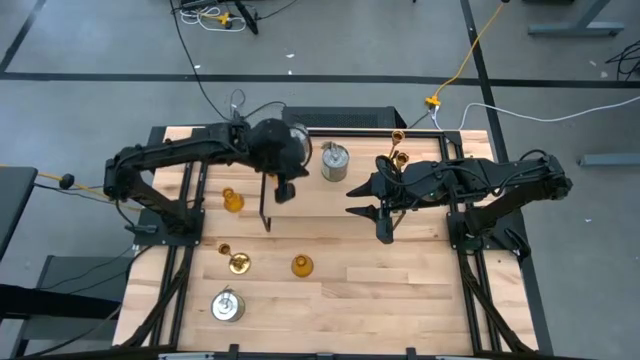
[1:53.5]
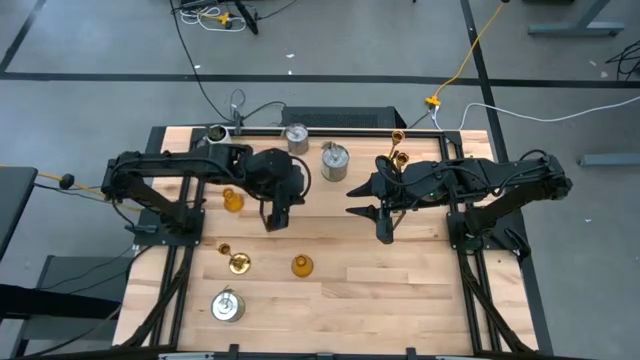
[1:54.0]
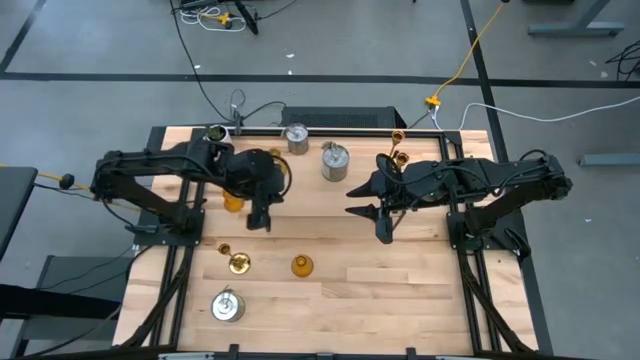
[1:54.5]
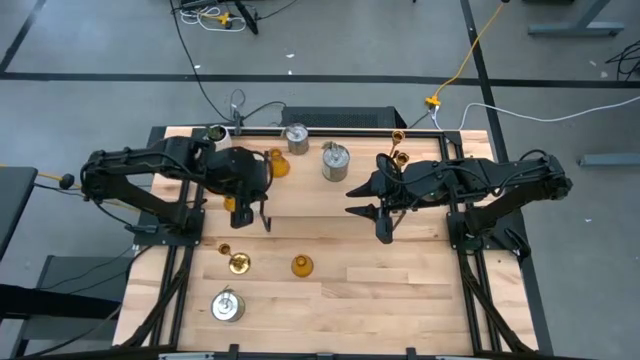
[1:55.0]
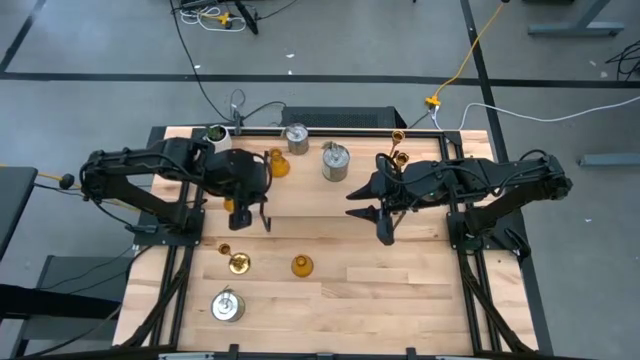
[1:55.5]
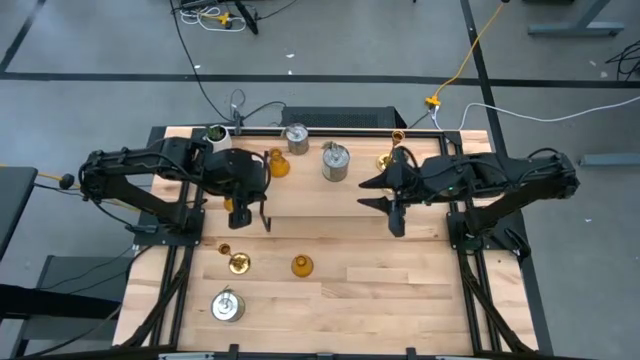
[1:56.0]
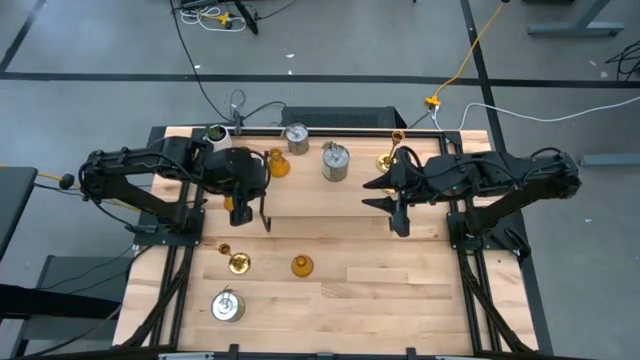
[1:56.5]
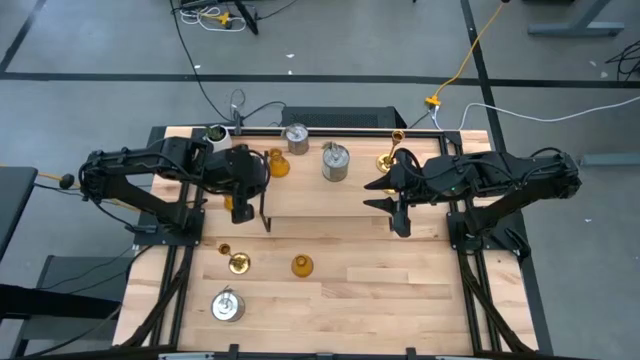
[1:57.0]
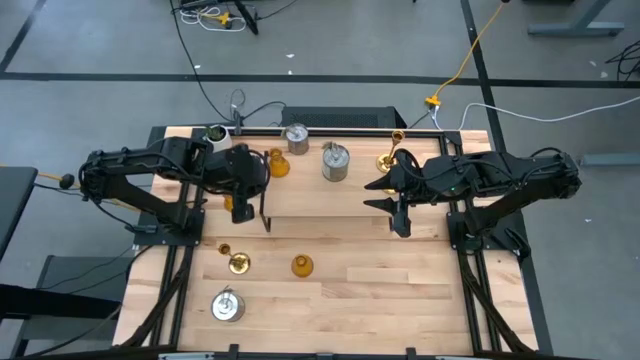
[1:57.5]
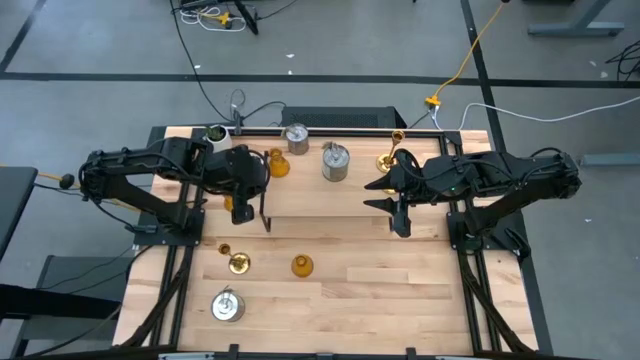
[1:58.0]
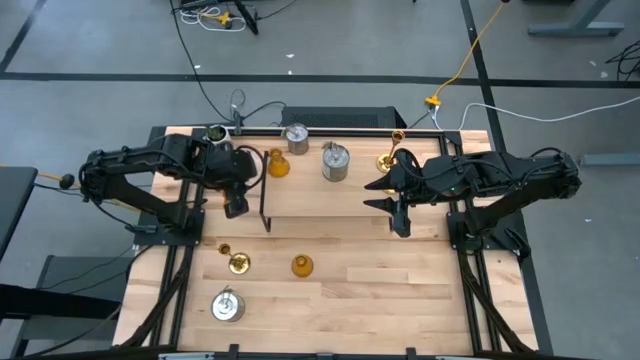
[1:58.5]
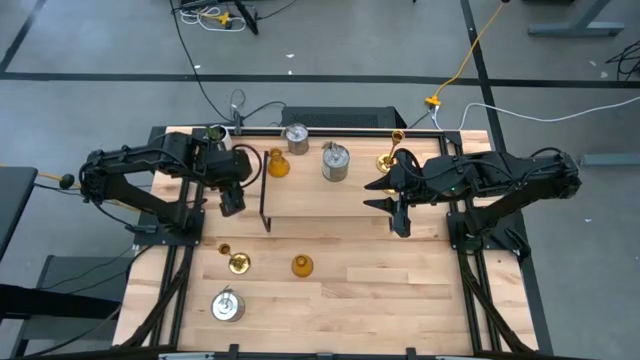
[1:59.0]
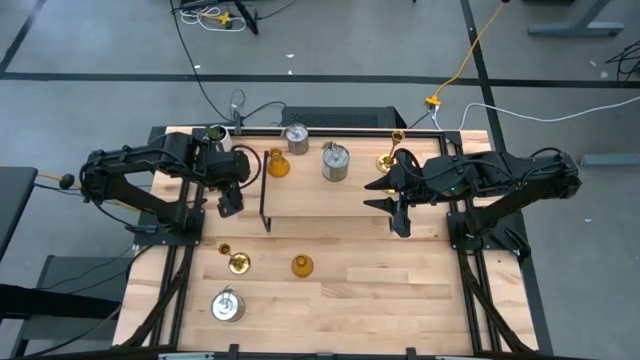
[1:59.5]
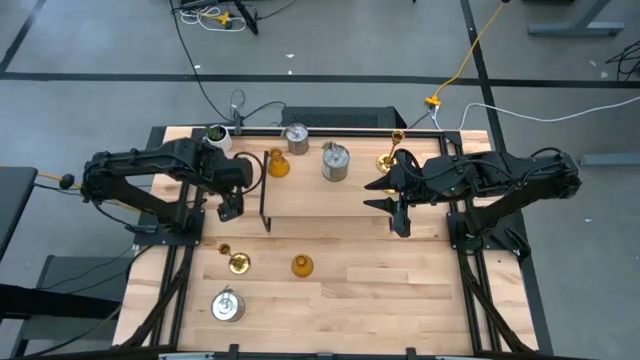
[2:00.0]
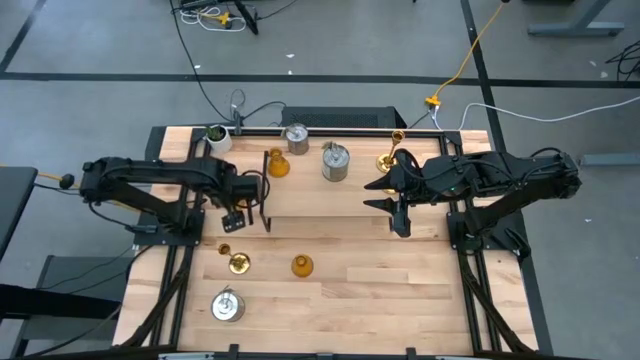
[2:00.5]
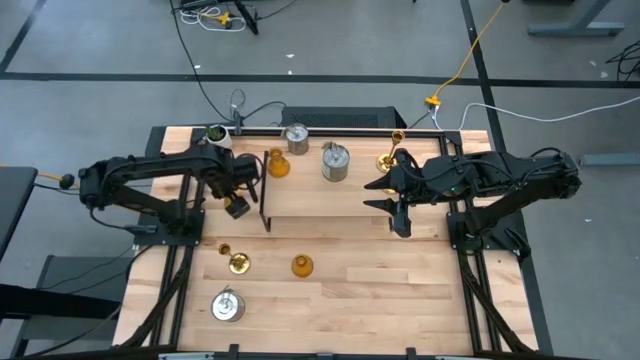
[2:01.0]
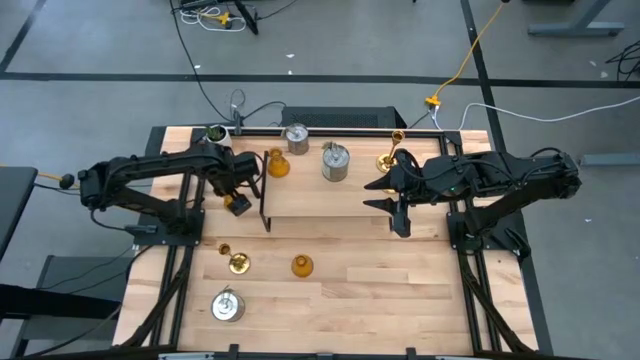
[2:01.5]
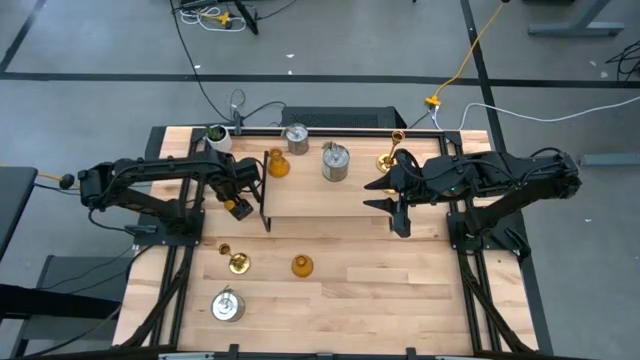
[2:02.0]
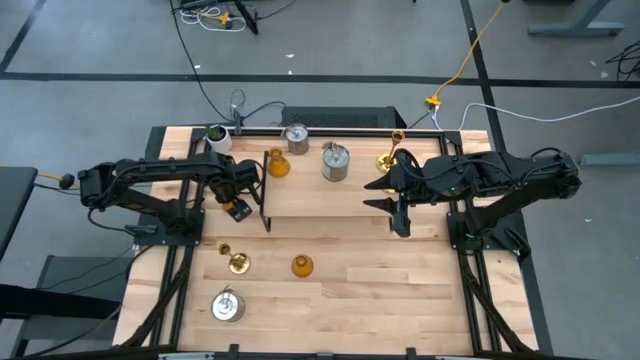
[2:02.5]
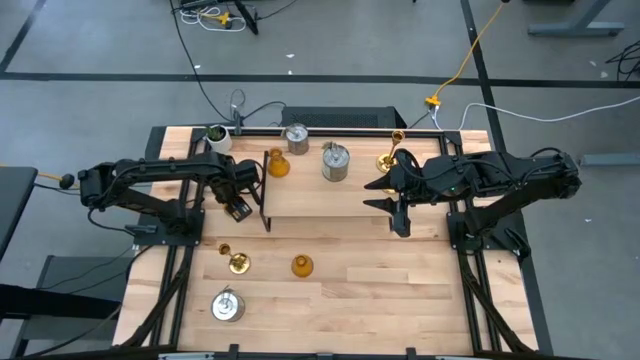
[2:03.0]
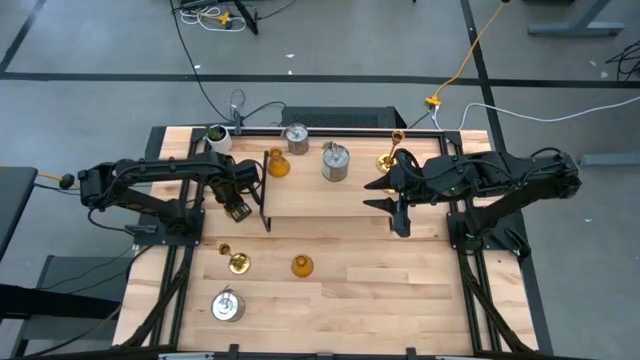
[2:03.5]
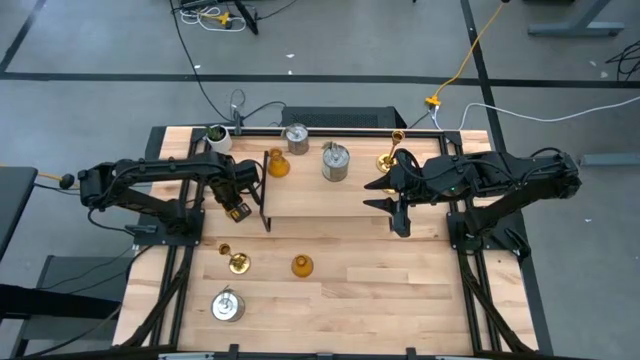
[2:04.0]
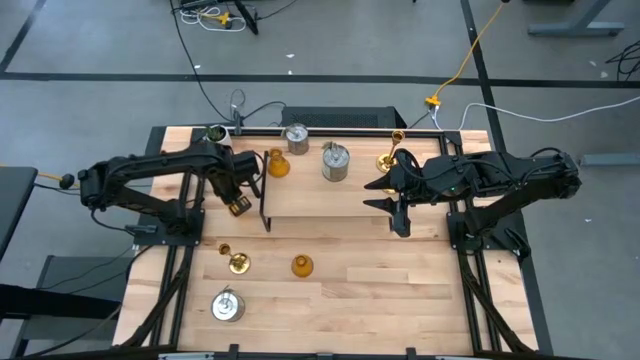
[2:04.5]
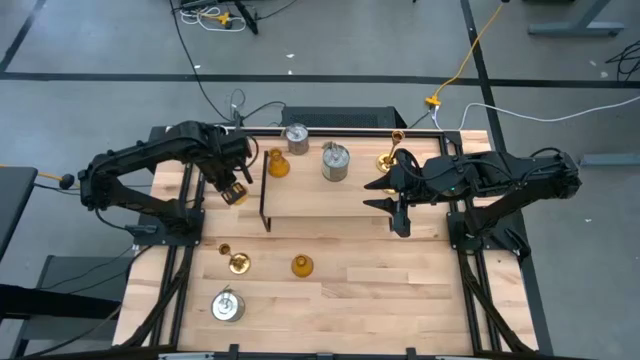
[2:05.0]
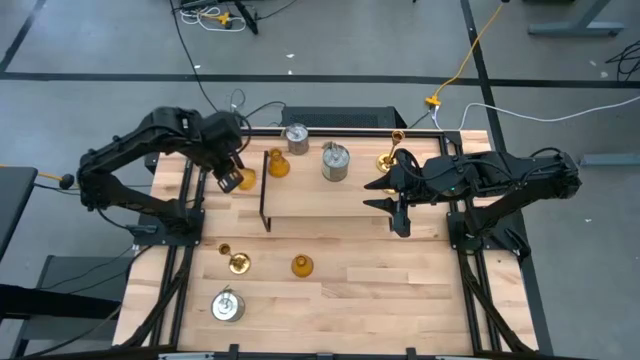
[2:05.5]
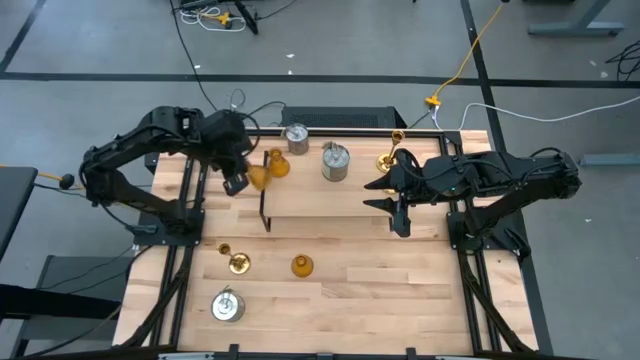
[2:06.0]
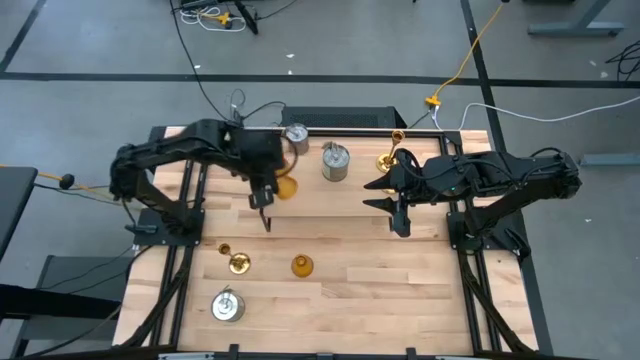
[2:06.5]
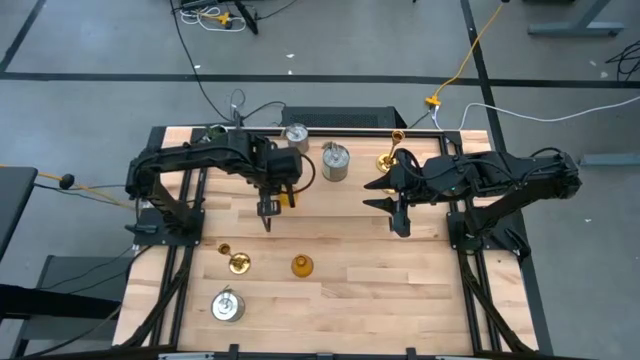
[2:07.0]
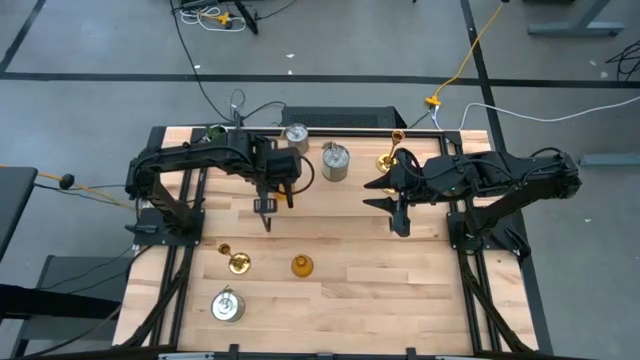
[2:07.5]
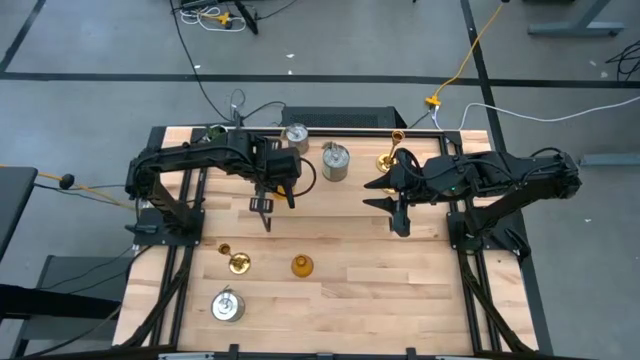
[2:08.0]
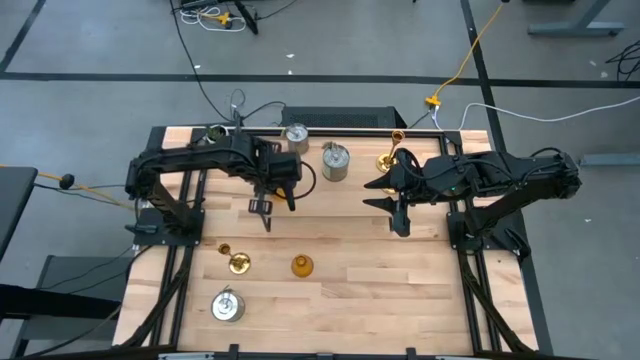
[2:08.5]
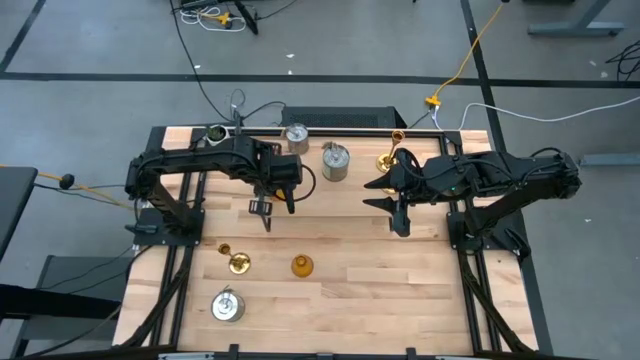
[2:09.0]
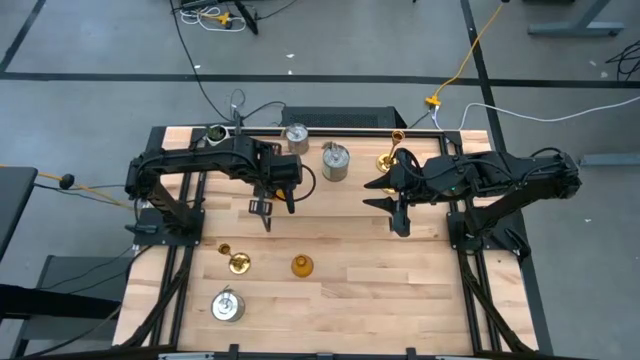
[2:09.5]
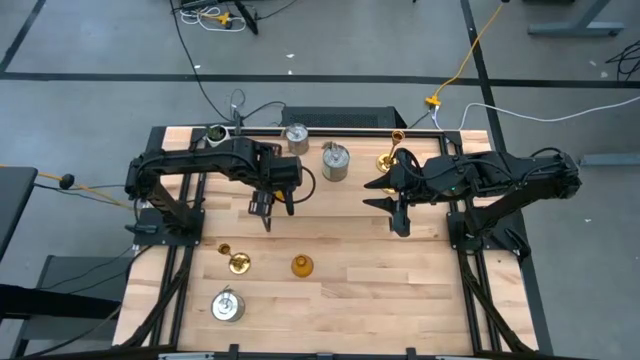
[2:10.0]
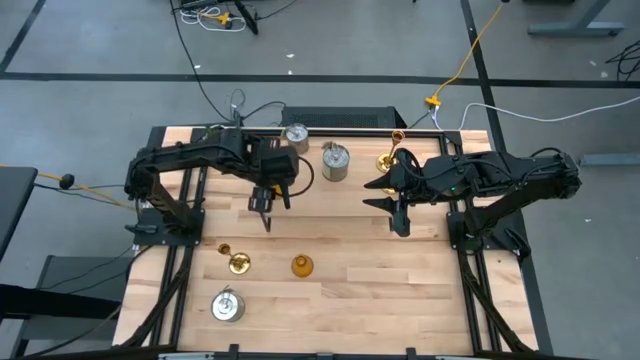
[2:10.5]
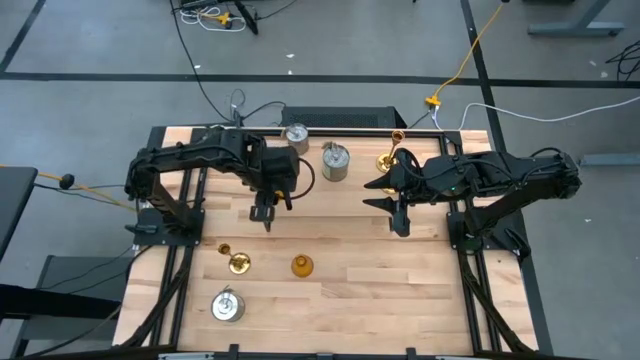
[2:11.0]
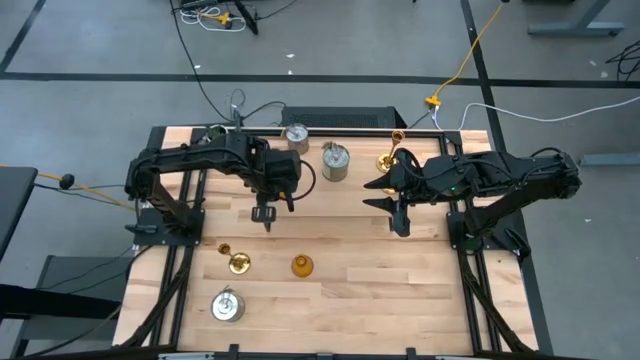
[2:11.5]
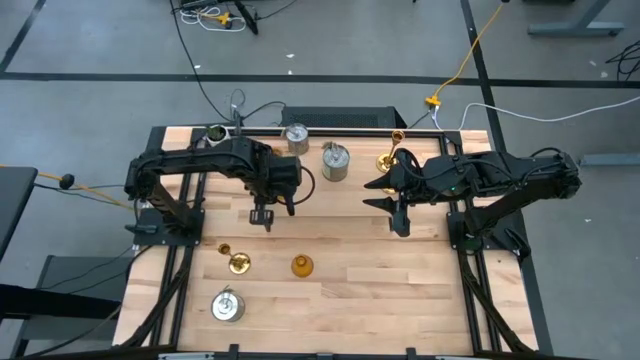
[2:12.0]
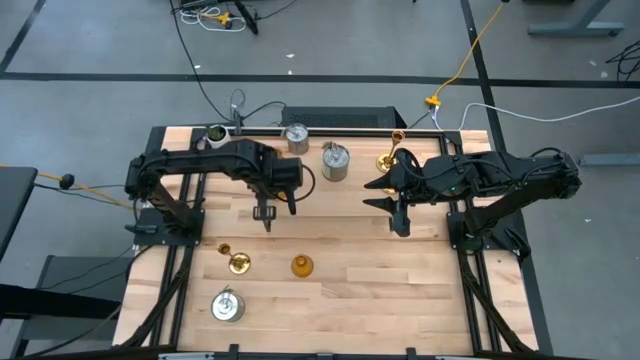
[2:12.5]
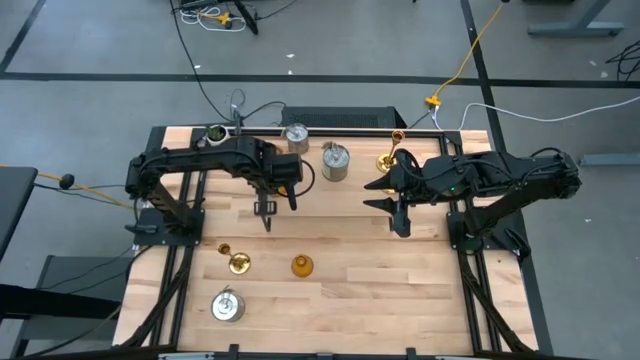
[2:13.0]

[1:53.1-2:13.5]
Task: Pick & Place candle stick holders
Put the left glass candle holder on the shelf aligned with the other glass candle holder

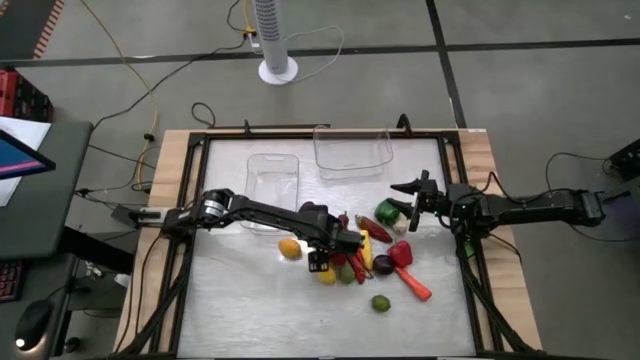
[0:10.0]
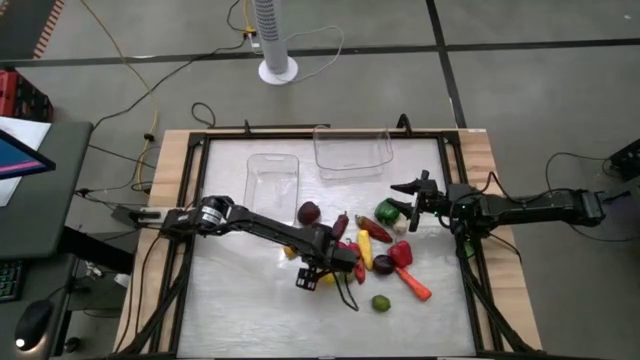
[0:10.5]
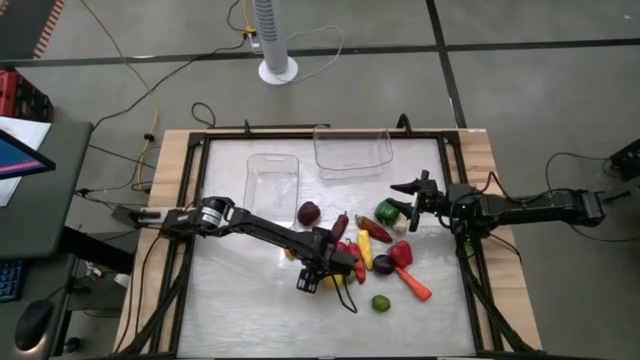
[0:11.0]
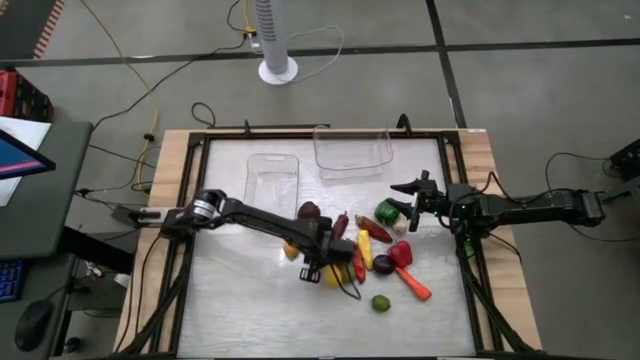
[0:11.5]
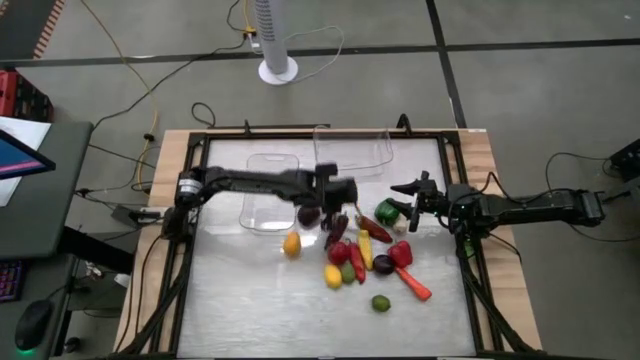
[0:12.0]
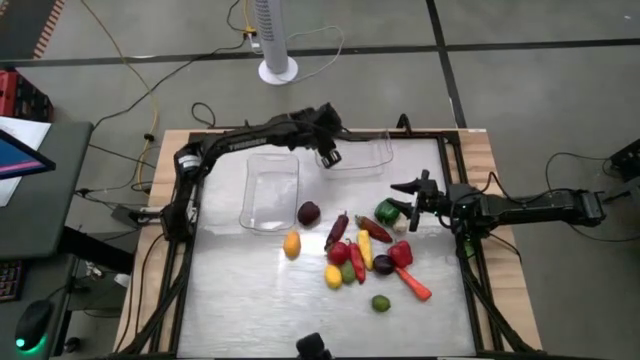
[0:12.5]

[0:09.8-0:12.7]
Task: Sort produce into baskets
Put the red strawberry into the right transparent bin
